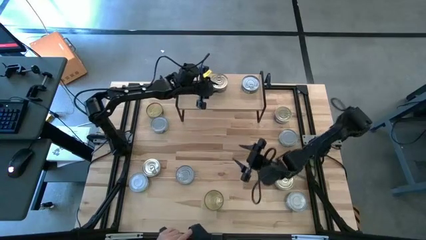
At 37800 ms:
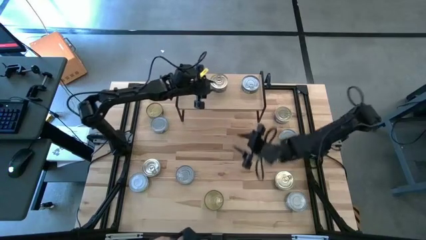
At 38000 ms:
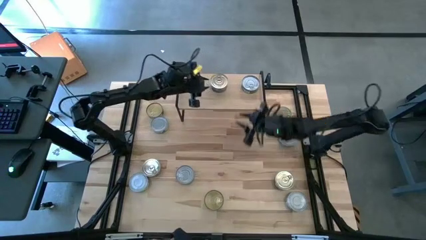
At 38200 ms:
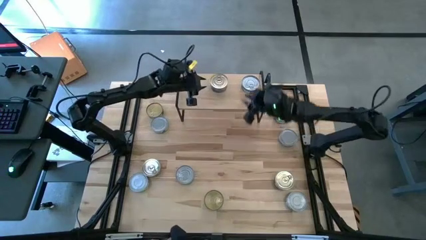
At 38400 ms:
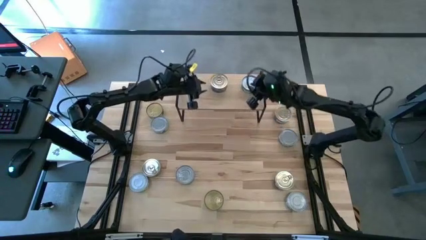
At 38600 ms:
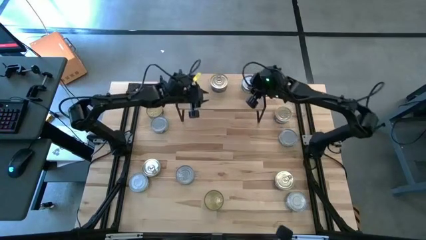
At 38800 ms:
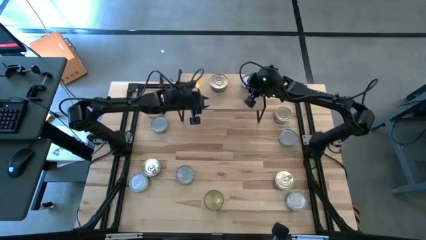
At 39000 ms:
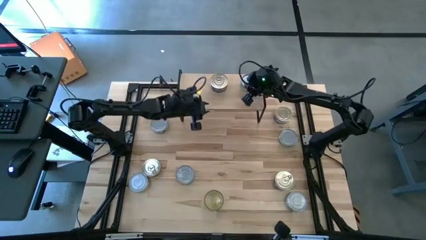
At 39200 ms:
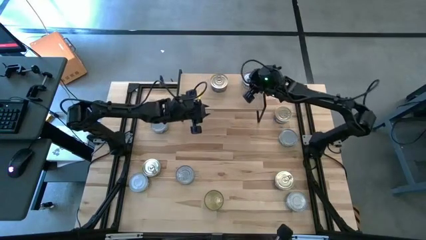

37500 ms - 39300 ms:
Task: Stack canned seafood by type on shelf
Adjust the green tuna can on the shelf

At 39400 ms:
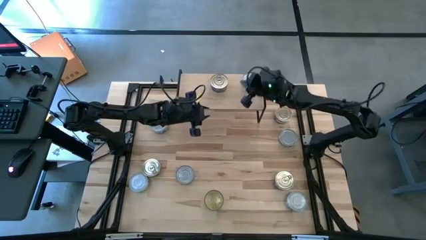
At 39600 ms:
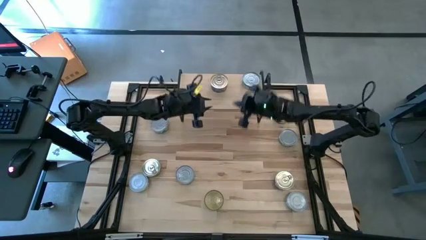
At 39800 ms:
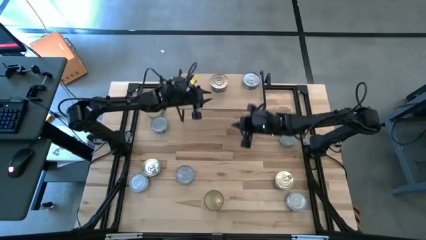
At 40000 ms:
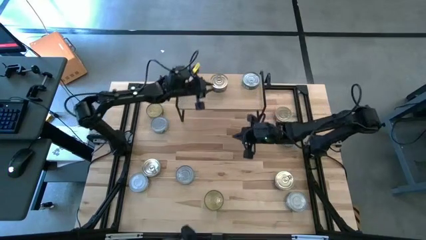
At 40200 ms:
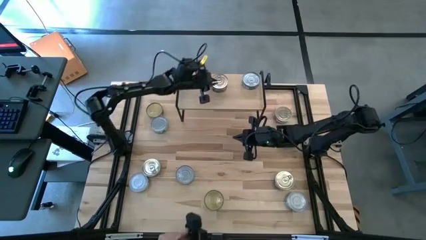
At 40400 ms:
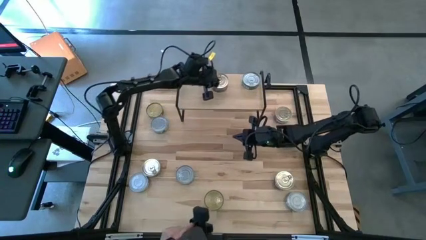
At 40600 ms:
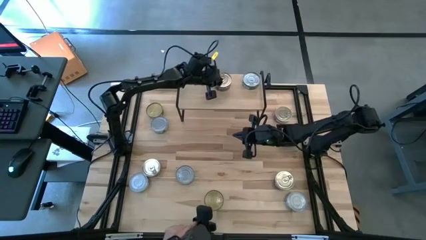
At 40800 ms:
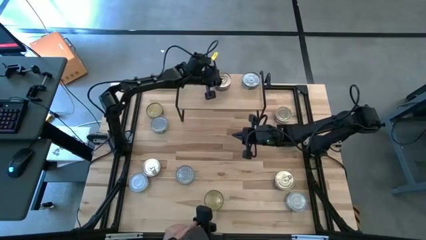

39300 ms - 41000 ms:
Adjust the blue tuna can on the shelf

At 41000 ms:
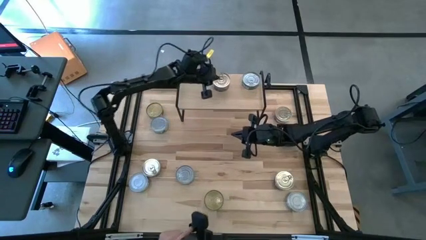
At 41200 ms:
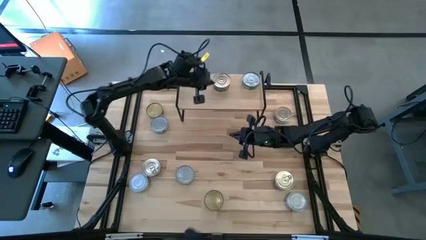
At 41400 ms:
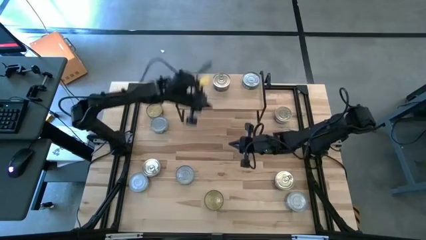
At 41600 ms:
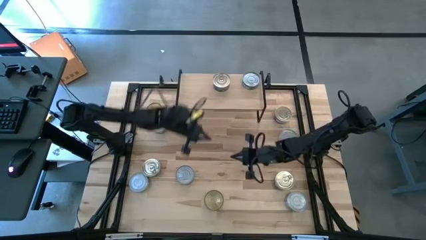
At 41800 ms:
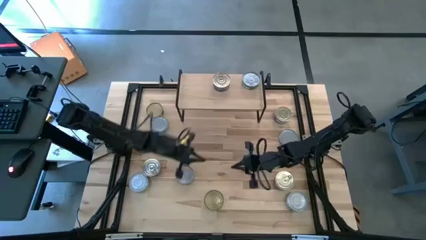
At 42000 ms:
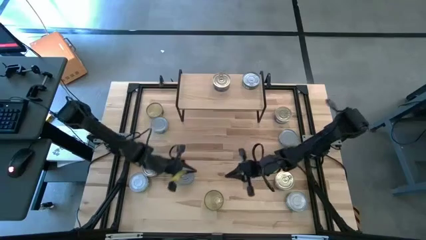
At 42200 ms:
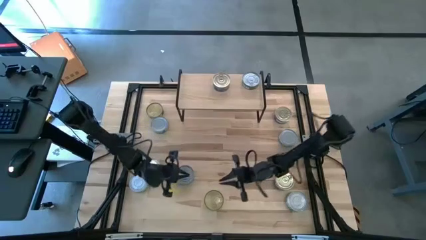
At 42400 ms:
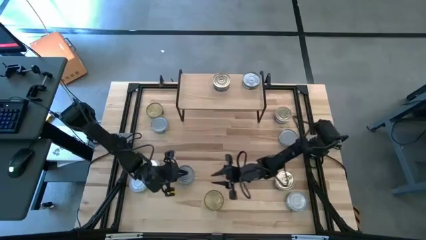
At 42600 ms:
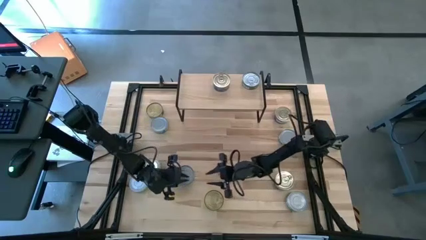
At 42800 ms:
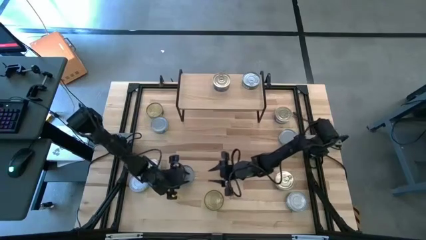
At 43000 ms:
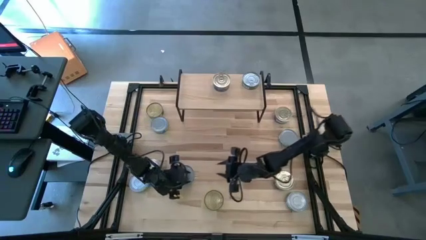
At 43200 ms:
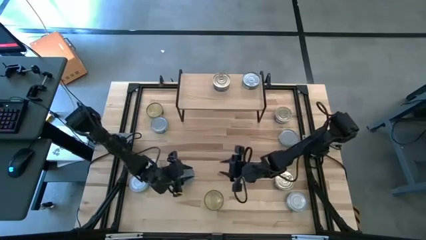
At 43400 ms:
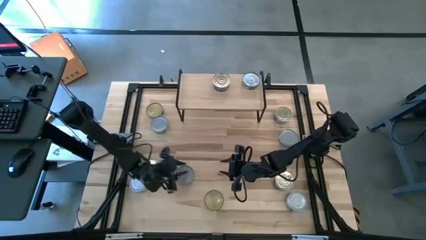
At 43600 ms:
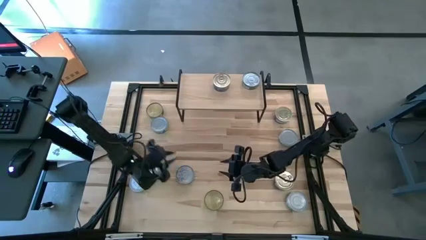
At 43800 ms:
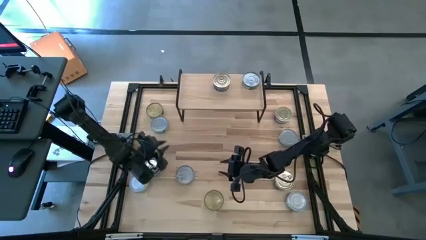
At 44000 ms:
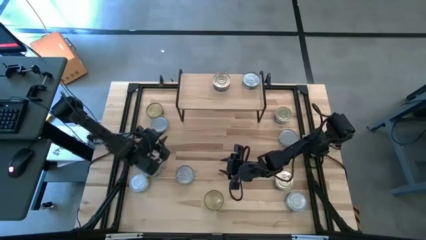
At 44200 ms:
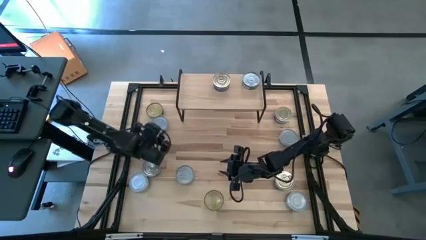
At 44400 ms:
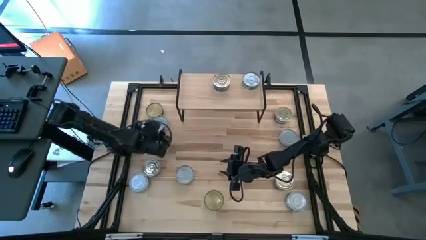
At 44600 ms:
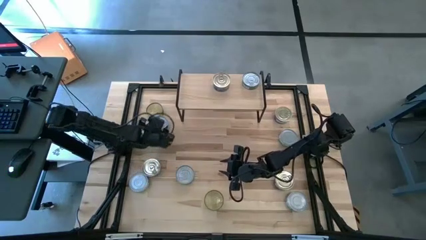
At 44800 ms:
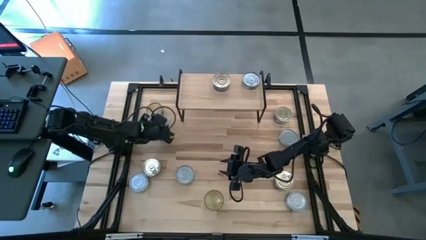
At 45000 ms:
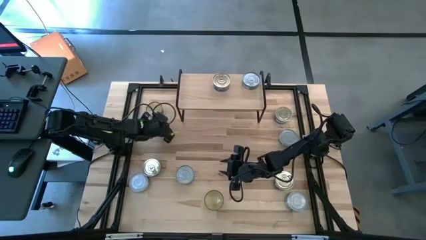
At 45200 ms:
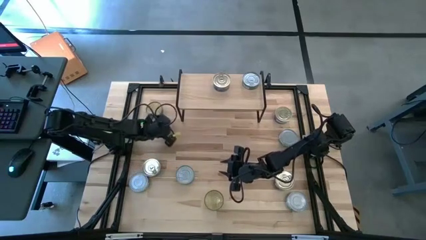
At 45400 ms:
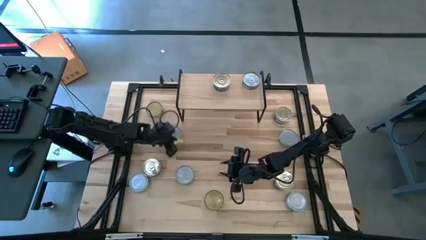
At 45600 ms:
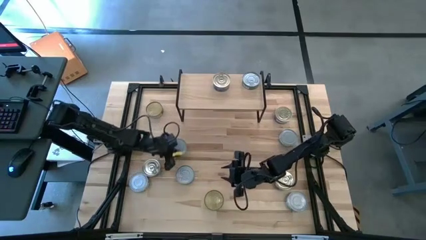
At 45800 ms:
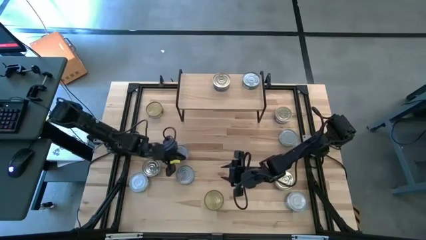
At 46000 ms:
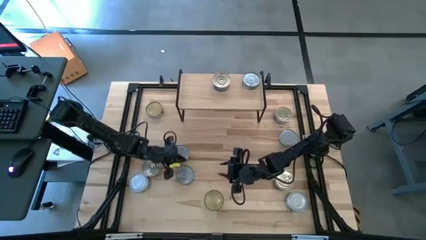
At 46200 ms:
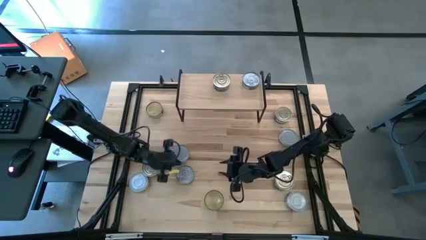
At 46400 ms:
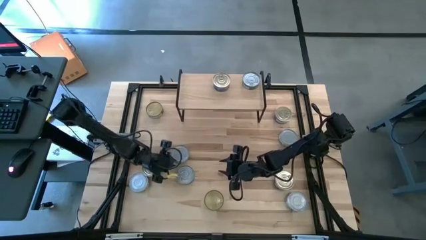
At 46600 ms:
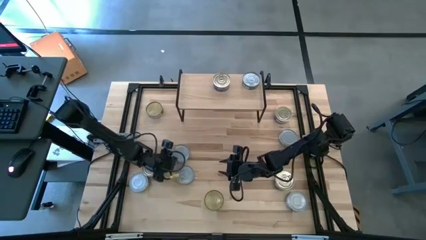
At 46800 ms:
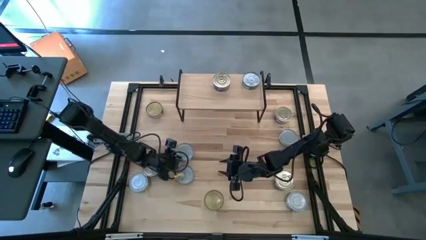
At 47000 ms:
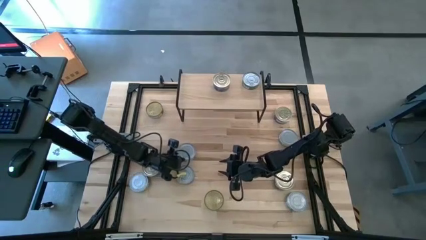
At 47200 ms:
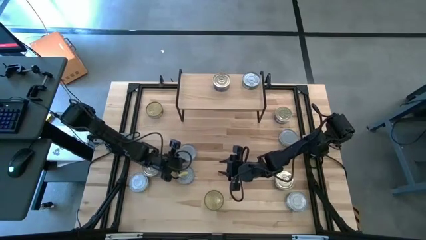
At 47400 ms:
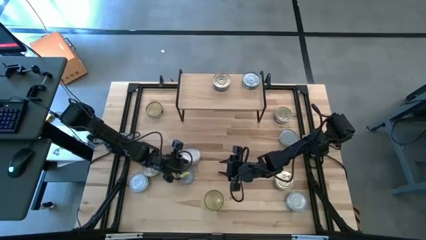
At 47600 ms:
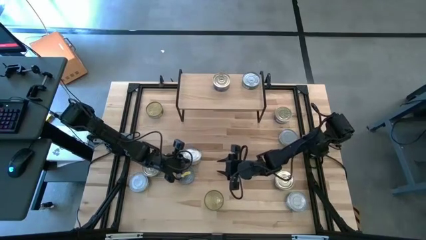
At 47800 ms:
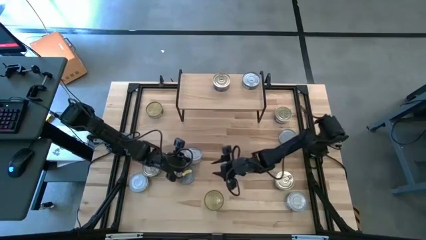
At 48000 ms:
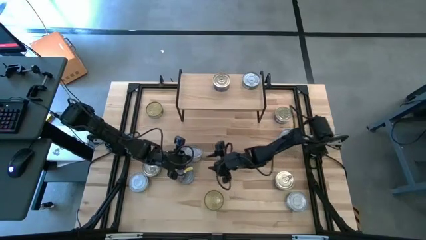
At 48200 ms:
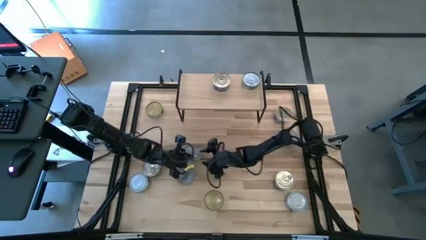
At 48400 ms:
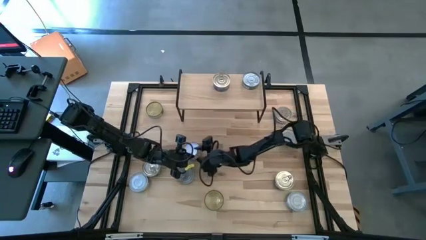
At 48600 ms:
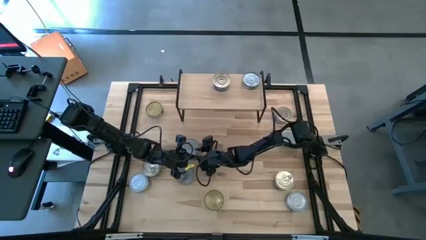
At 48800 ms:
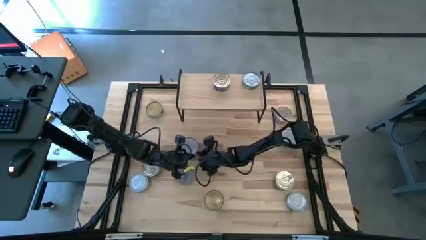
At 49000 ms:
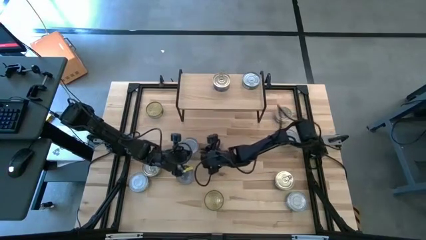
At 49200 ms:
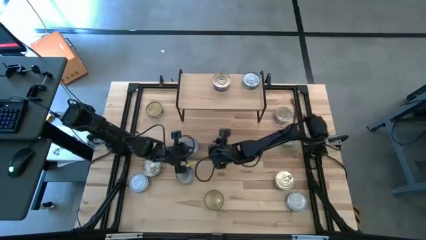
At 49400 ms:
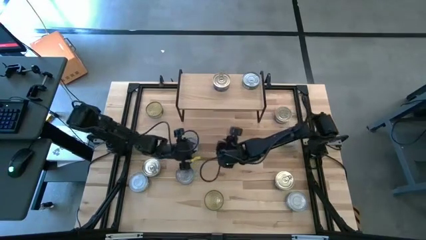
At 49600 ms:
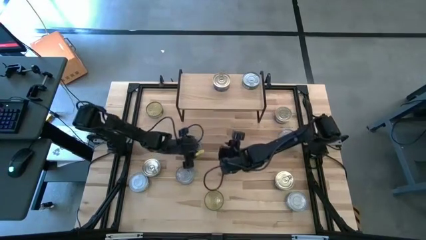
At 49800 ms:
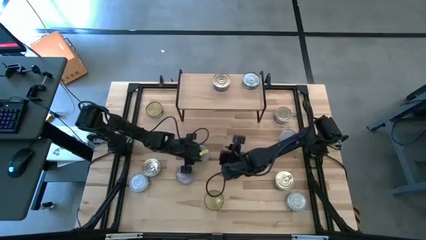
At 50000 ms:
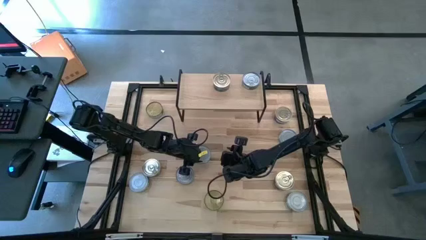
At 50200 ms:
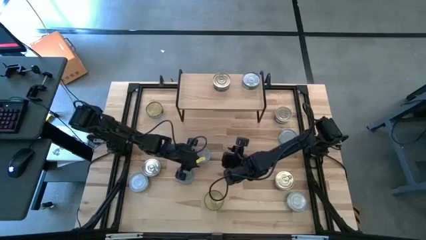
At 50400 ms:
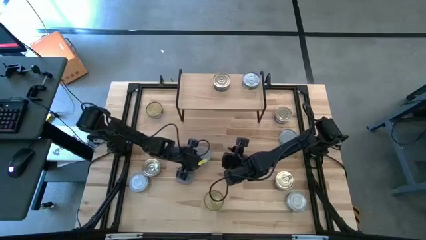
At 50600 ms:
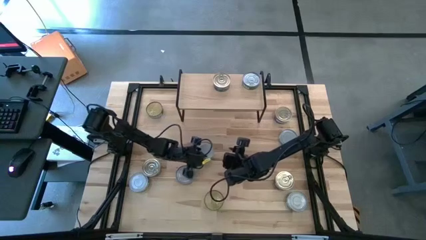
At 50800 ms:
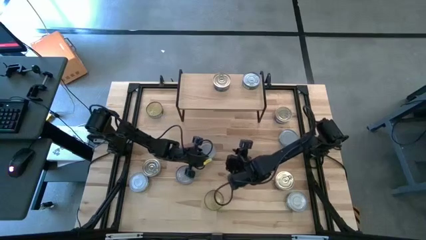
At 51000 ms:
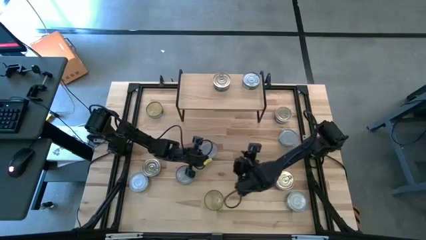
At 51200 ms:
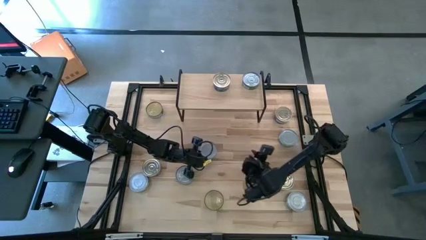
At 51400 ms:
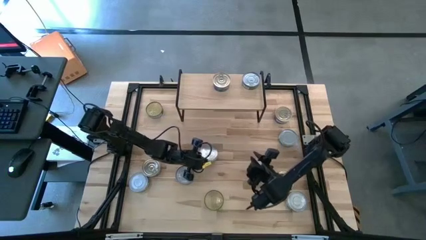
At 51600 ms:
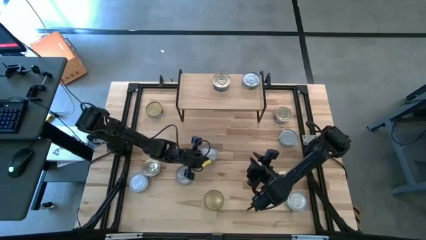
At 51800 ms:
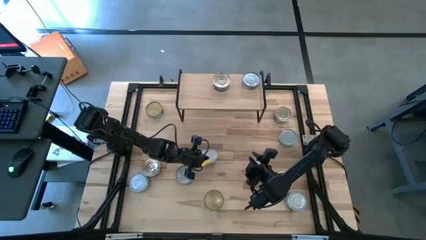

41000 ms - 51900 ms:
Put the green white tuna can on the shelf
